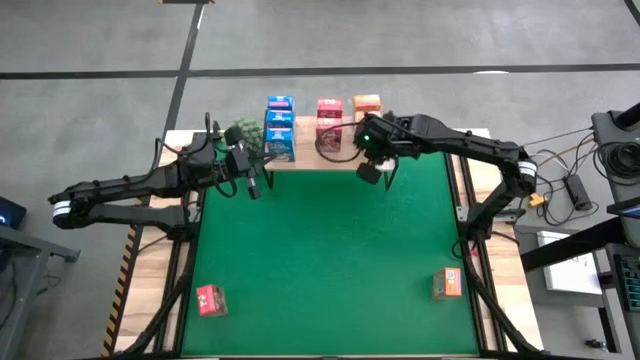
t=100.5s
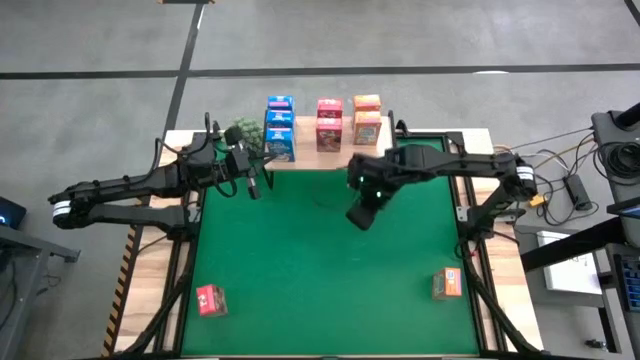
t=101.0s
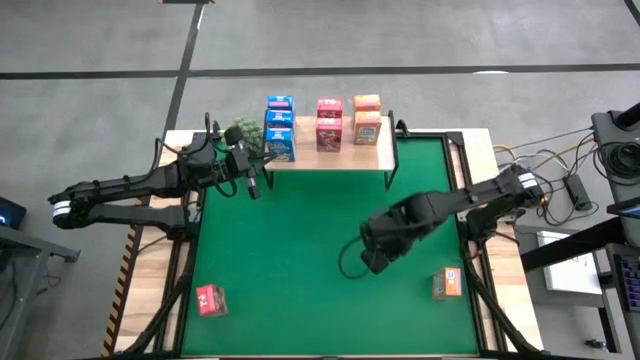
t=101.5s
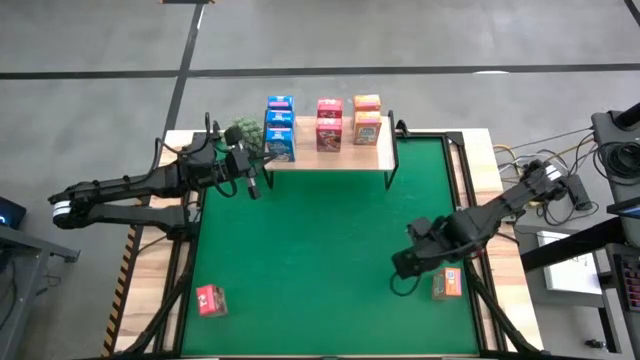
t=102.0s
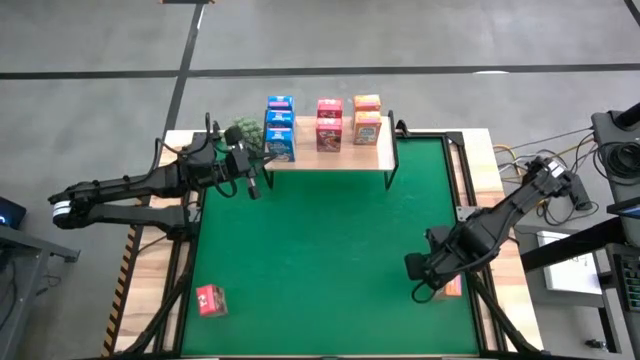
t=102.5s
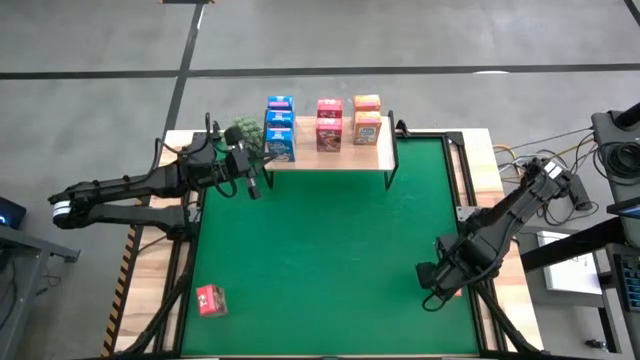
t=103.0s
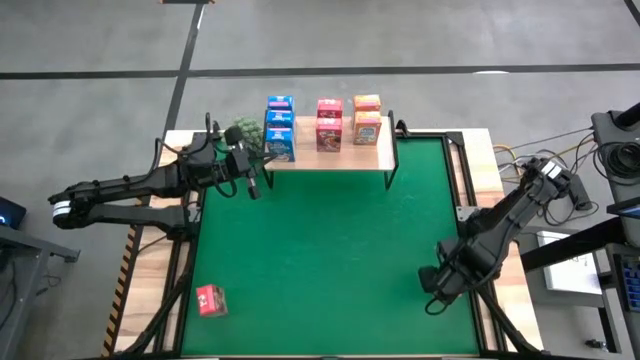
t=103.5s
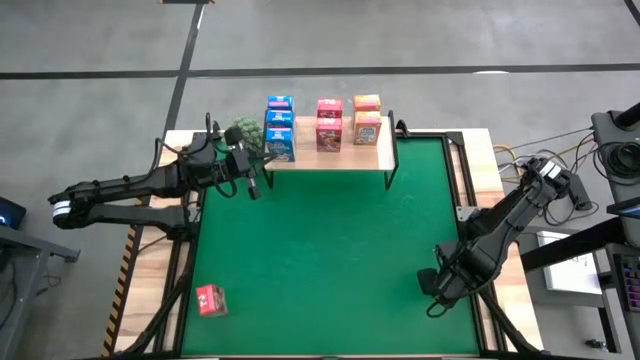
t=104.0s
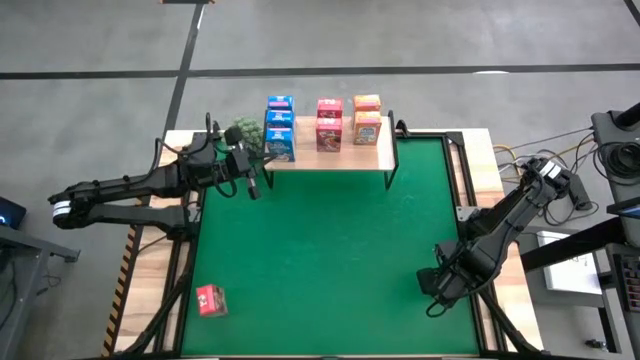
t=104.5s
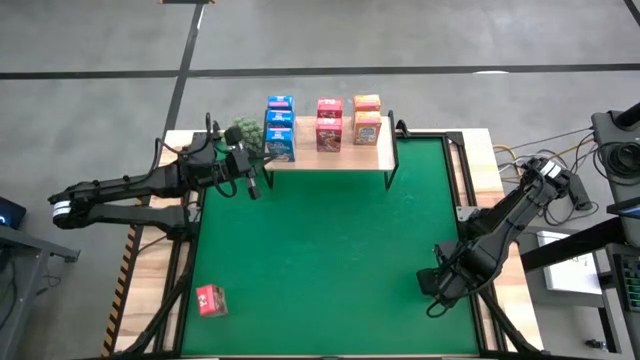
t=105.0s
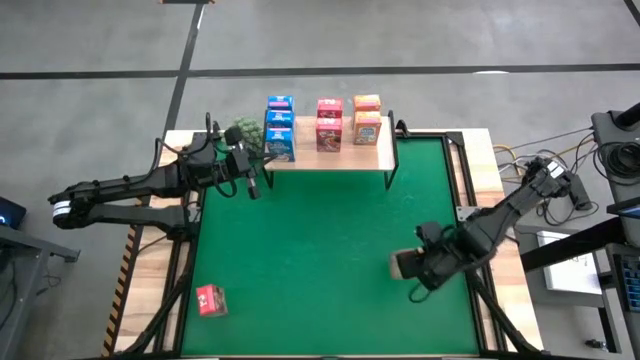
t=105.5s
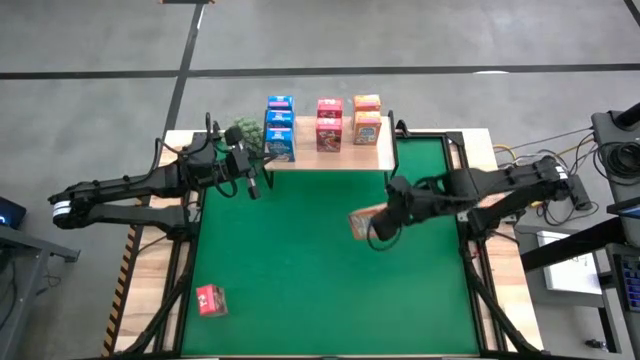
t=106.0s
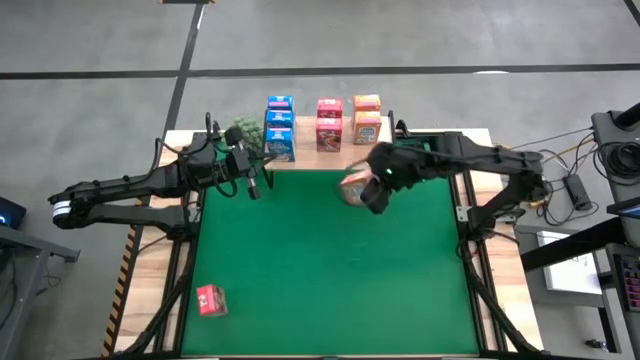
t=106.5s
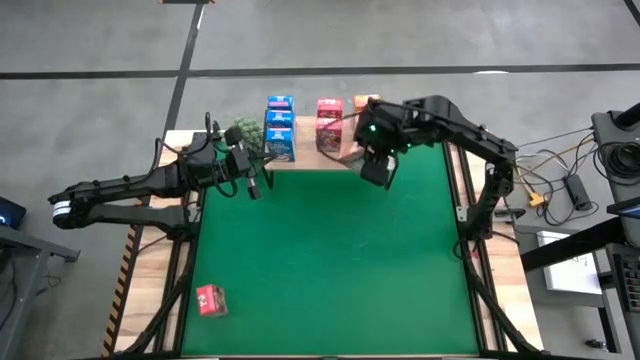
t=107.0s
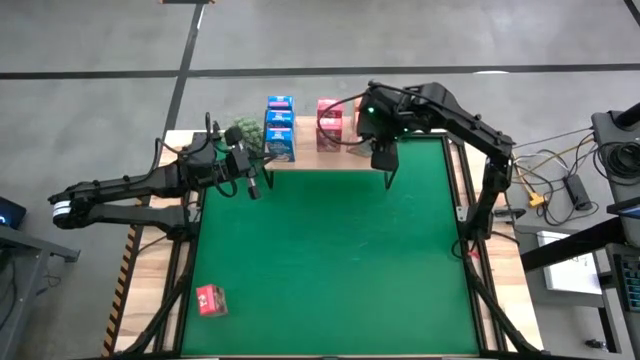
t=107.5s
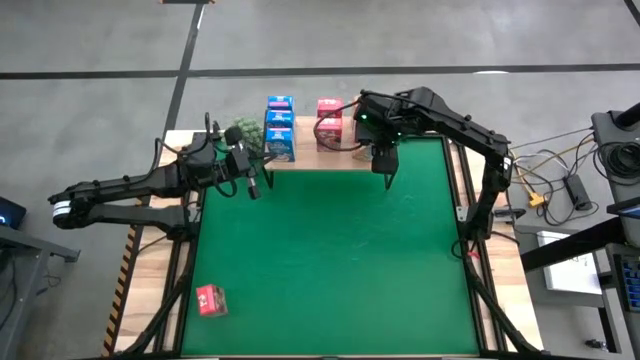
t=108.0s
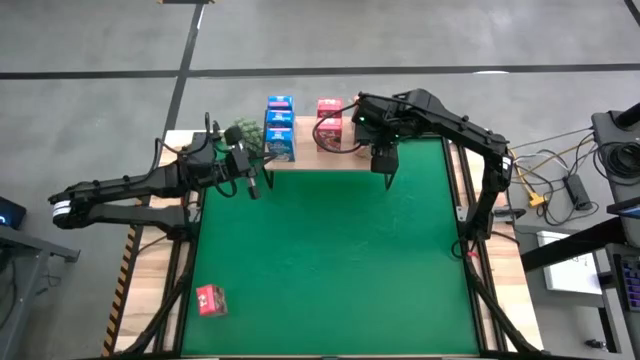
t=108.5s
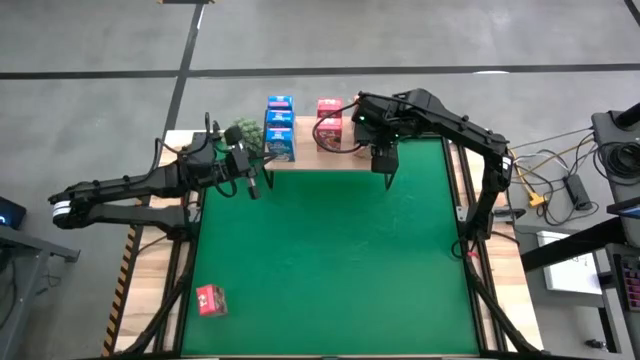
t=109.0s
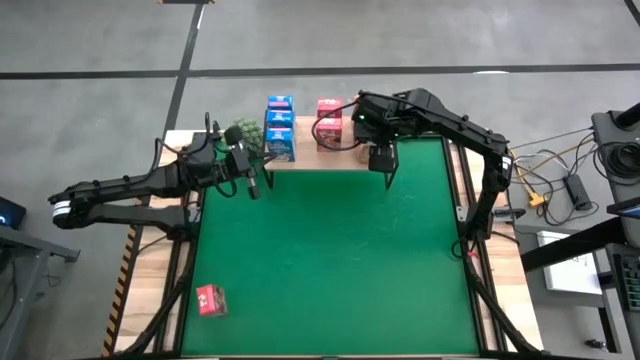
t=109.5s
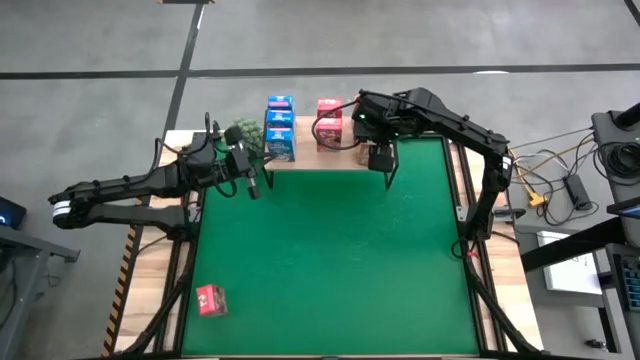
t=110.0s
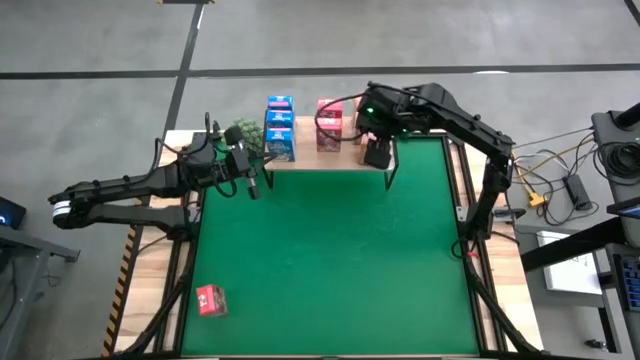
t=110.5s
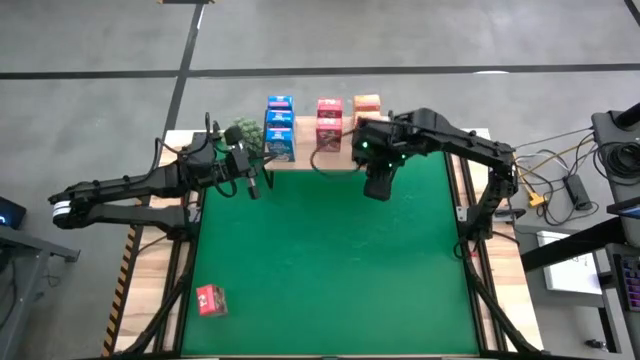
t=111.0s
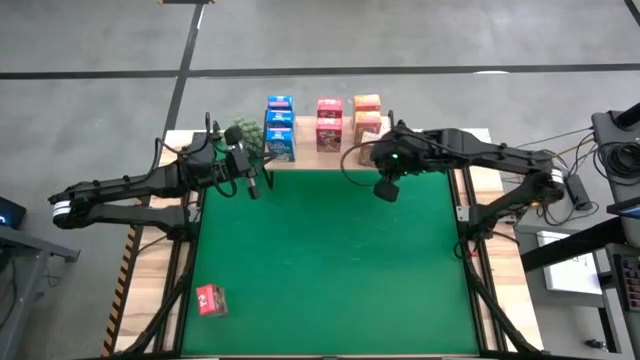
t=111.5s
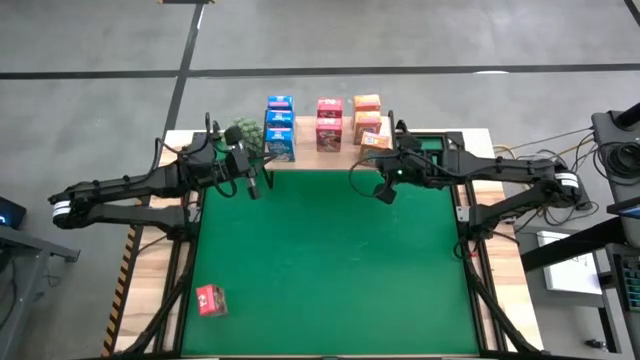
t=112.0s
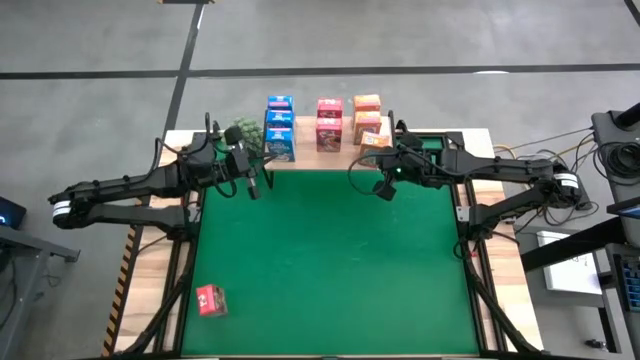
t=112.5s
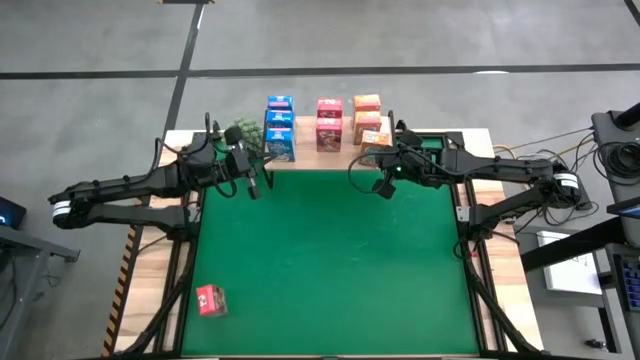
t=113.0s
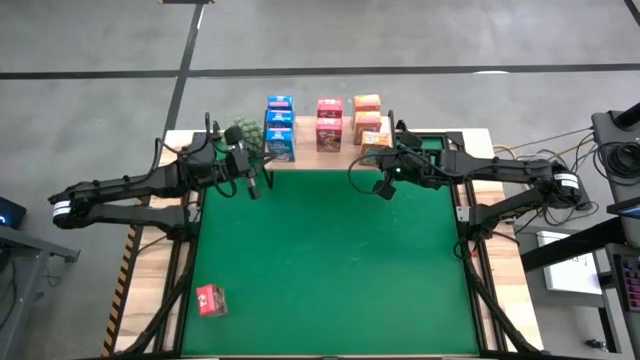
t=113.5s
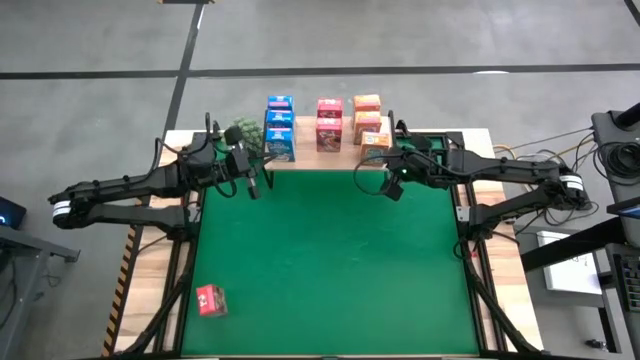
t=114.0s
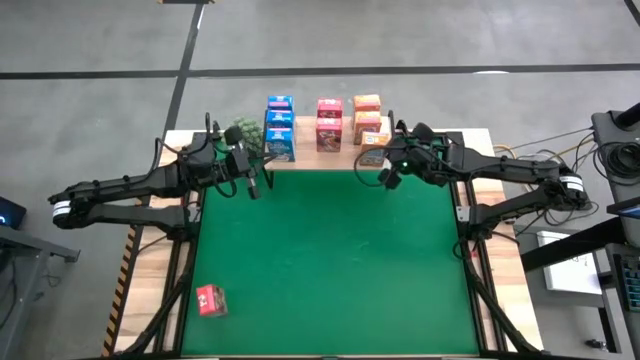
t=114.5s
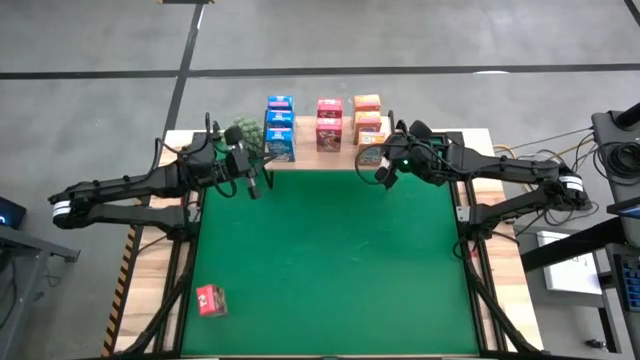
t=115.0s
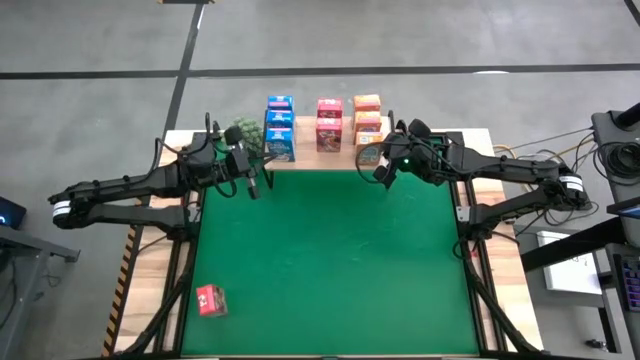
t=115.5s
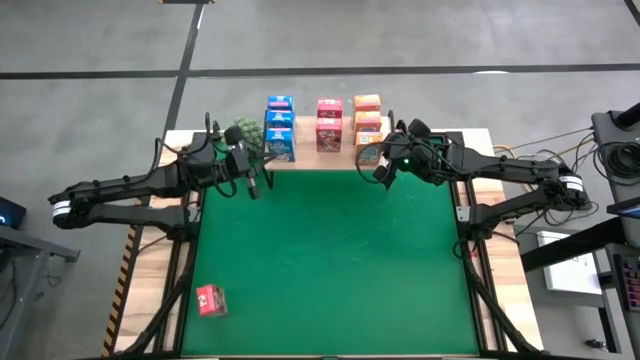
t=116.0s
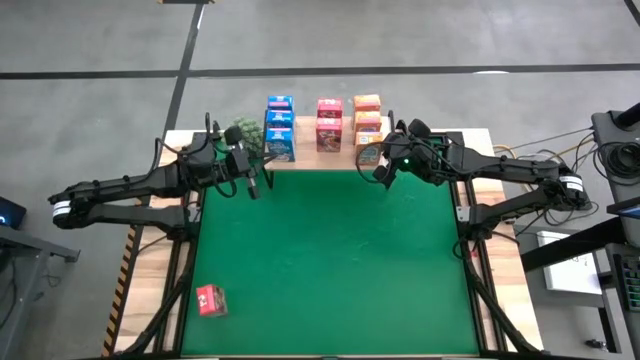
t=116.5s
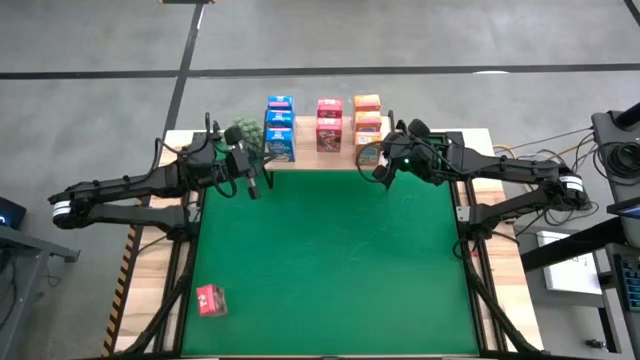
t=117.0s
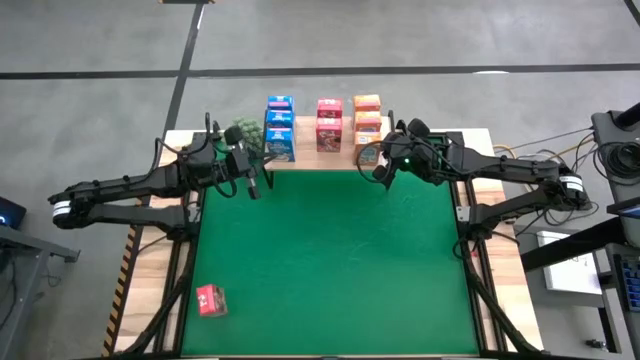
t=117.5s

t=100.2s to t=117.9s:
Task: Stack cereal on shelf
Put the orange cereal box on the shelf aligned with the other orange cereal boxes

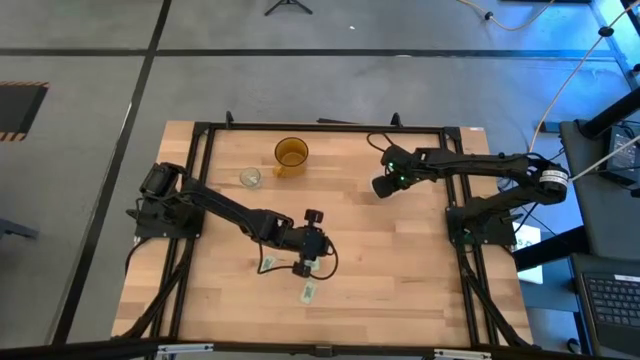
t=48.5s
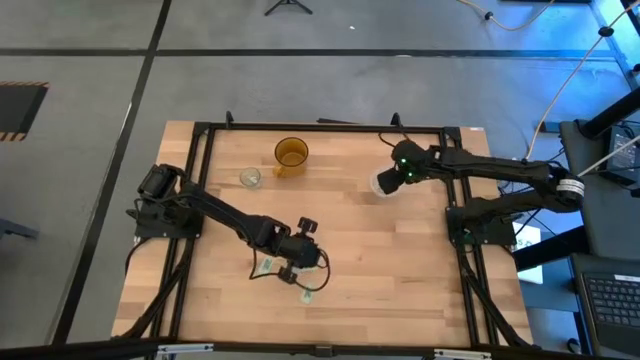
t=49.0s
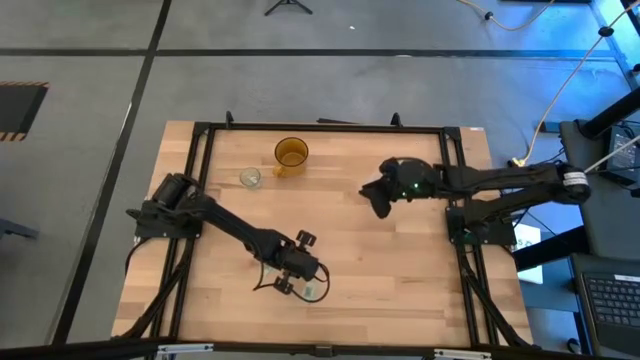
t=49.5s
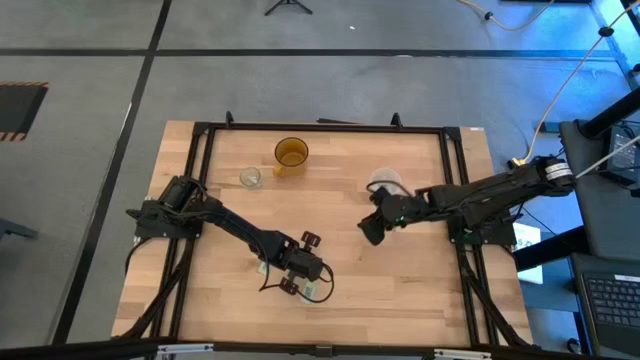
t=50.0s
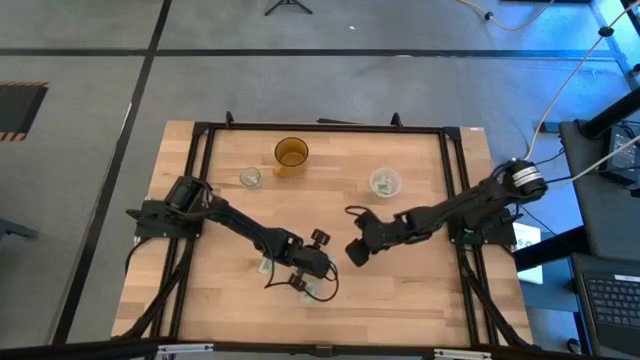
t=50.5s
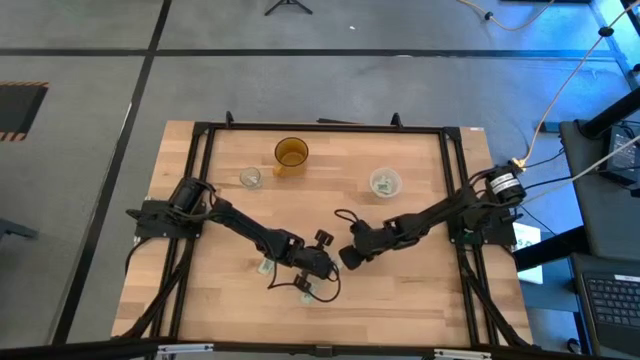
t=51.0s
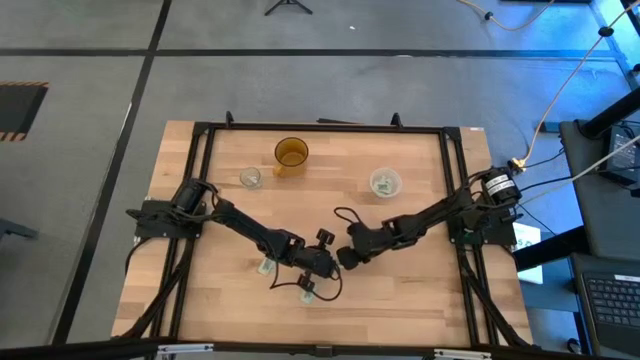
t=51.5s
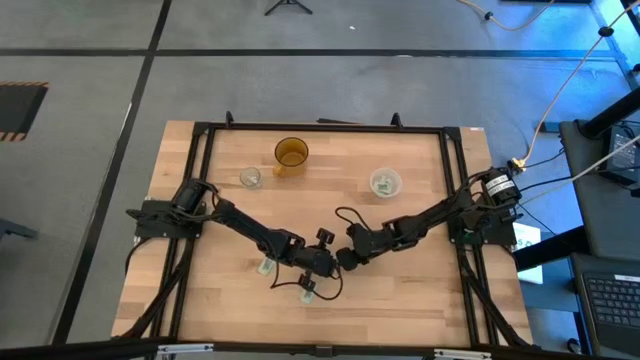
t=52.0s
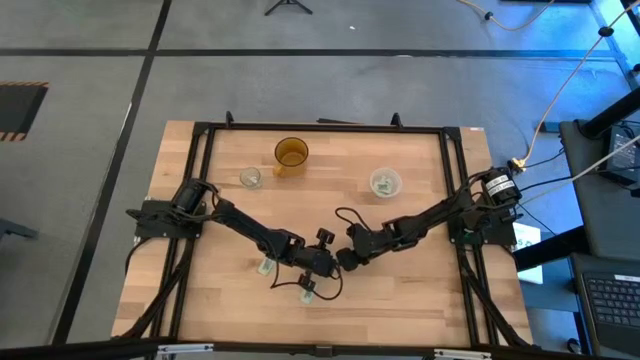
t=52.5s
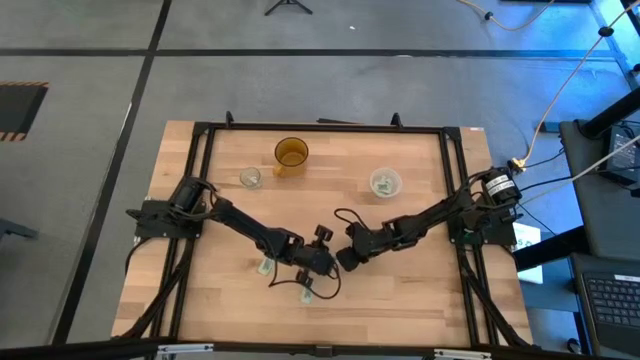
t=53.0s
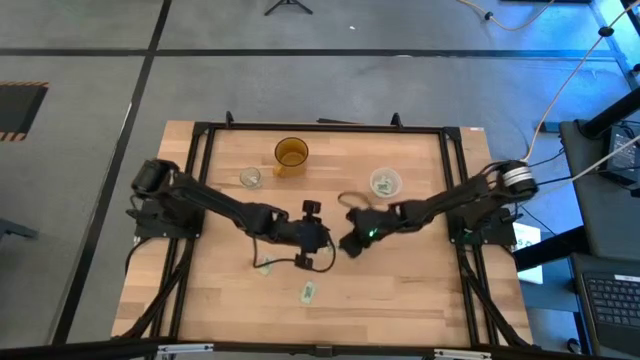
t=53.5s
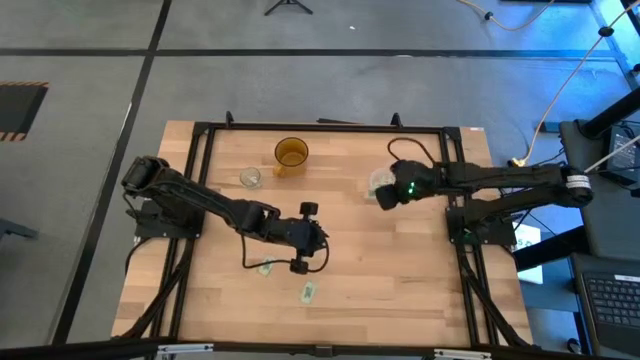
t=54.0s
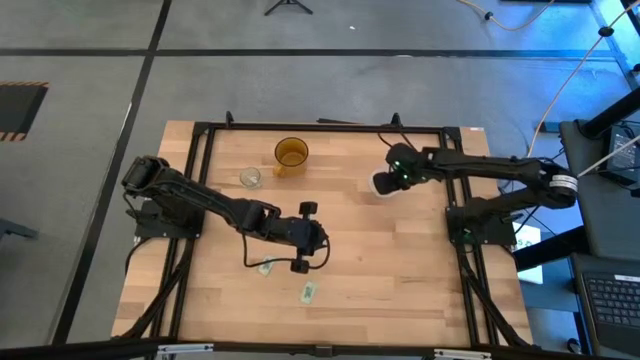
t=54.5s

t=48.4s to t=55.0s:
Task: Pick and place Stevia / Truvia into bins
Put the stevia packet into the transparent container
